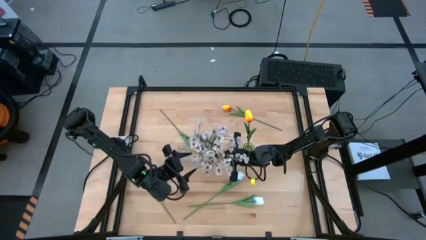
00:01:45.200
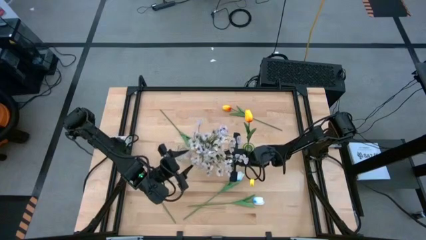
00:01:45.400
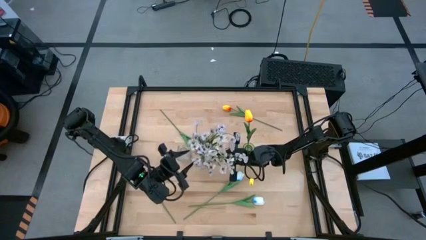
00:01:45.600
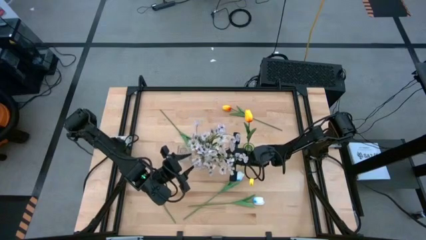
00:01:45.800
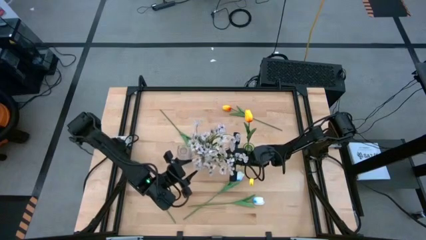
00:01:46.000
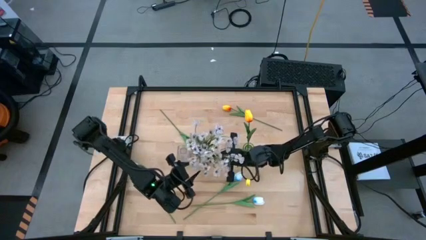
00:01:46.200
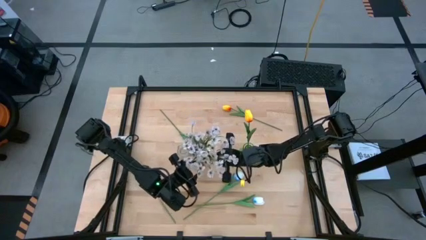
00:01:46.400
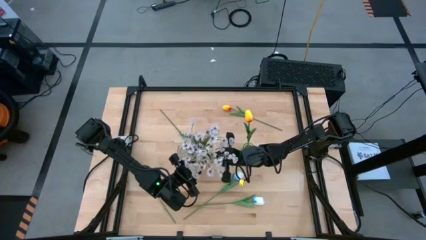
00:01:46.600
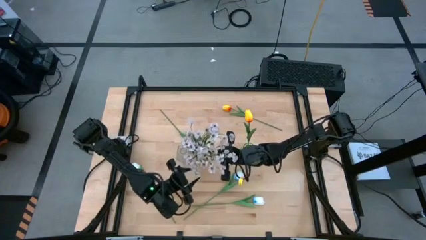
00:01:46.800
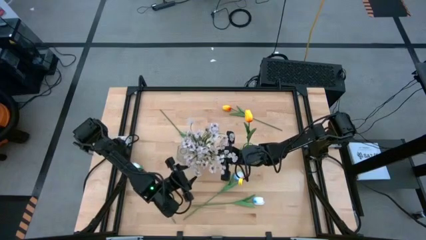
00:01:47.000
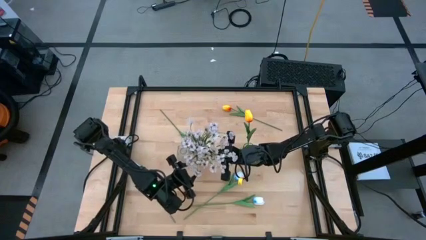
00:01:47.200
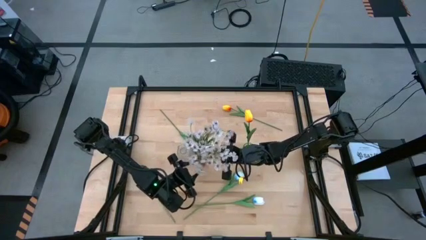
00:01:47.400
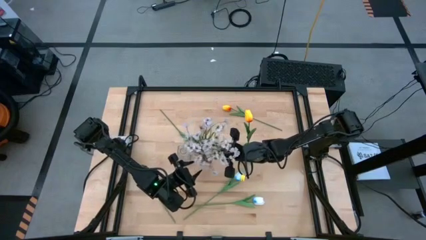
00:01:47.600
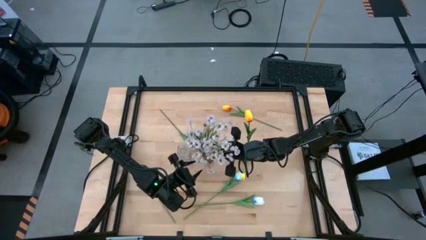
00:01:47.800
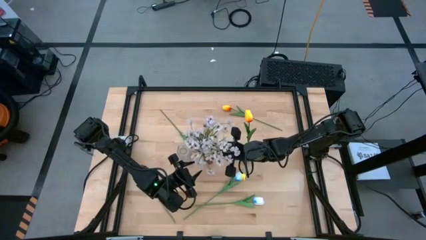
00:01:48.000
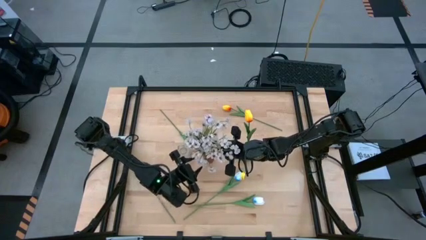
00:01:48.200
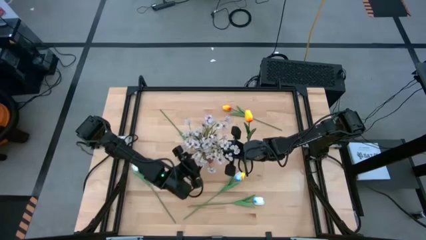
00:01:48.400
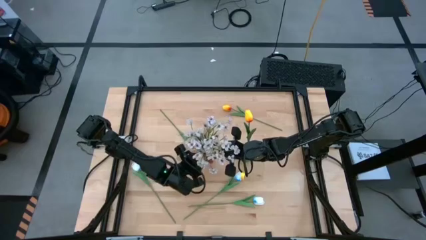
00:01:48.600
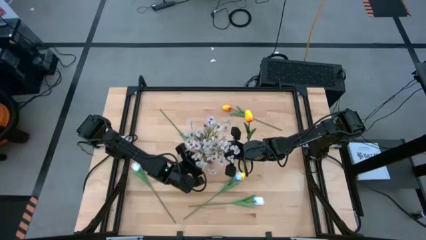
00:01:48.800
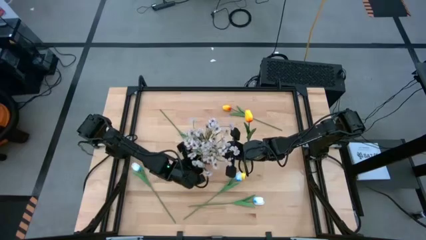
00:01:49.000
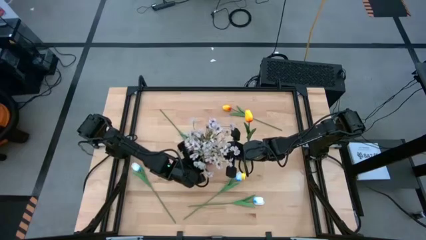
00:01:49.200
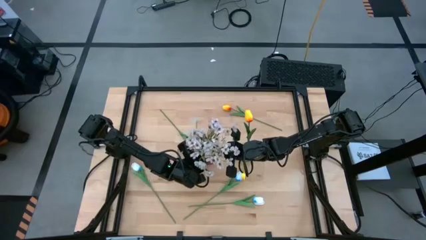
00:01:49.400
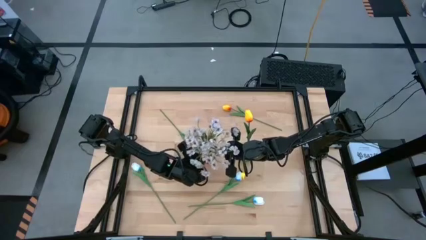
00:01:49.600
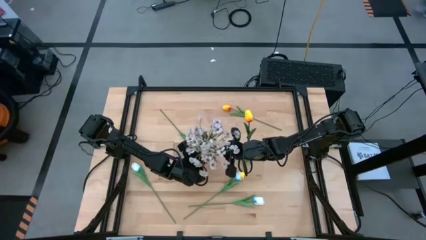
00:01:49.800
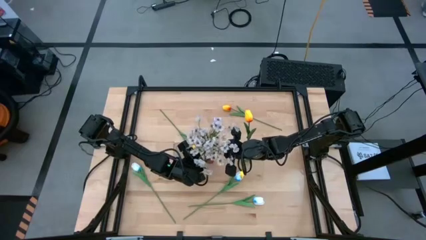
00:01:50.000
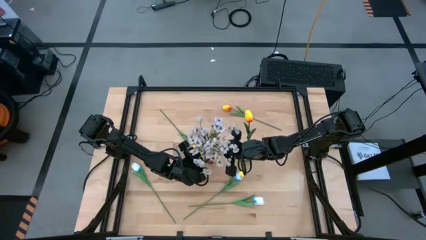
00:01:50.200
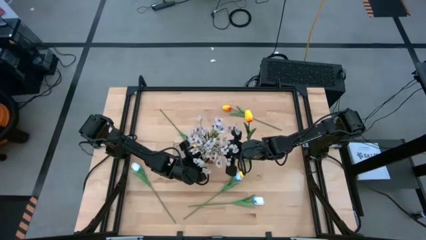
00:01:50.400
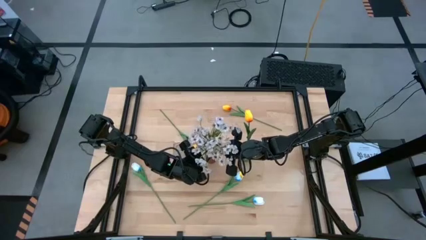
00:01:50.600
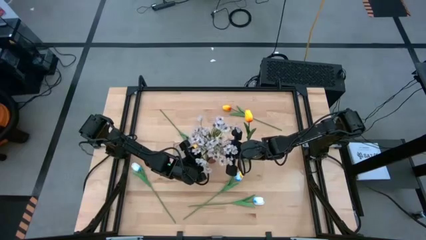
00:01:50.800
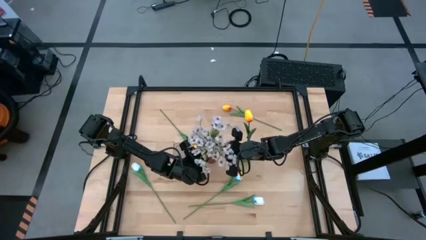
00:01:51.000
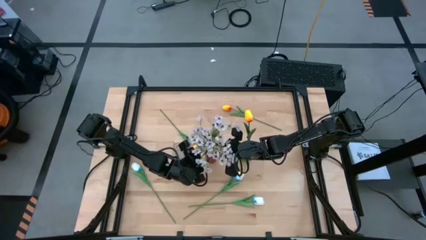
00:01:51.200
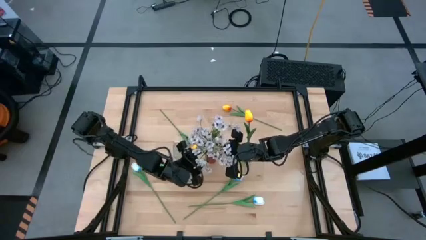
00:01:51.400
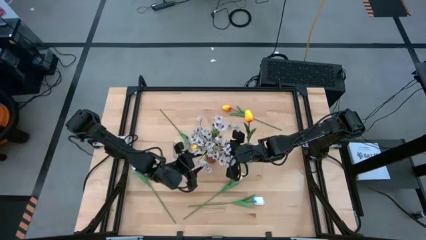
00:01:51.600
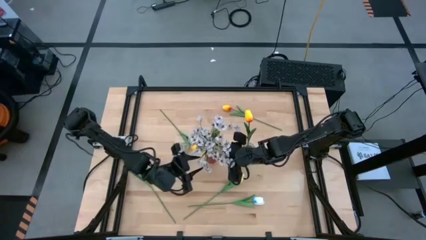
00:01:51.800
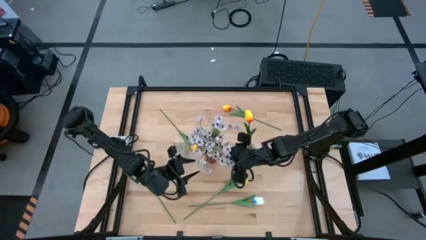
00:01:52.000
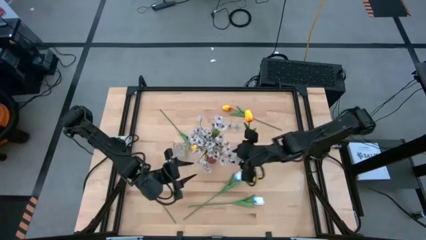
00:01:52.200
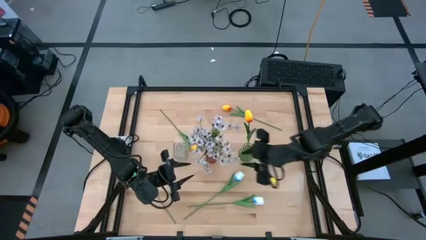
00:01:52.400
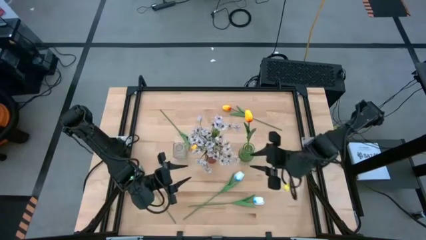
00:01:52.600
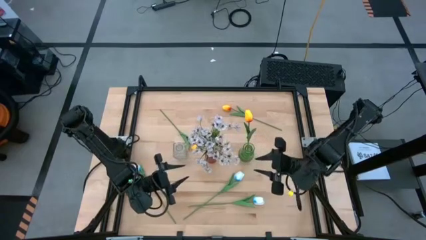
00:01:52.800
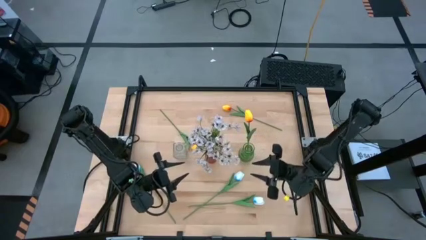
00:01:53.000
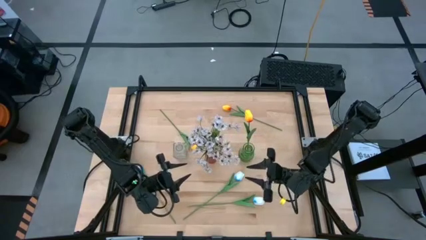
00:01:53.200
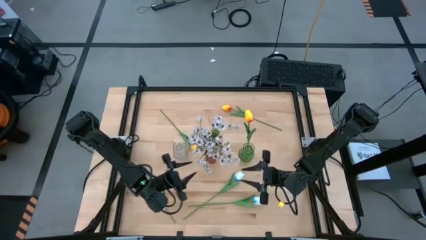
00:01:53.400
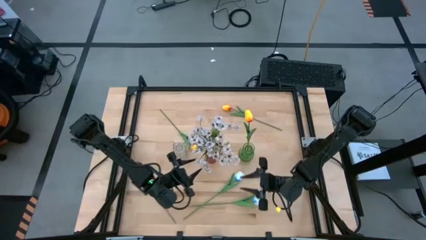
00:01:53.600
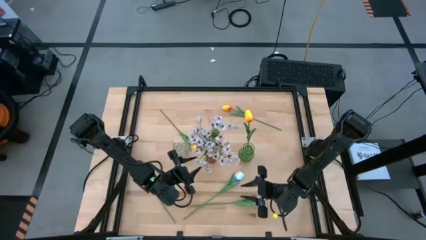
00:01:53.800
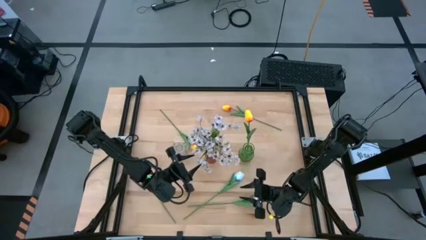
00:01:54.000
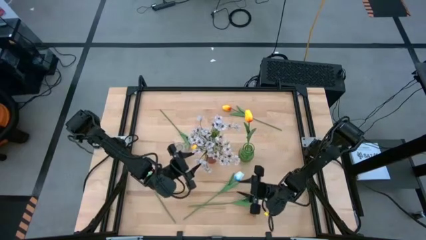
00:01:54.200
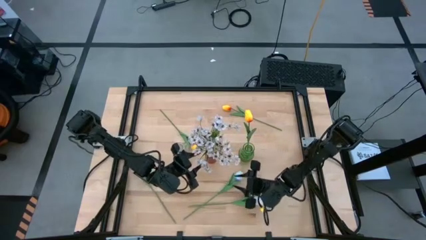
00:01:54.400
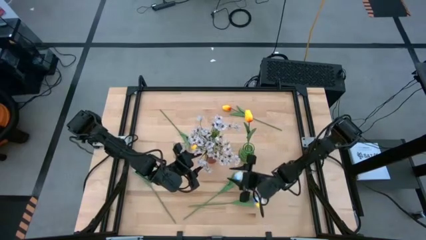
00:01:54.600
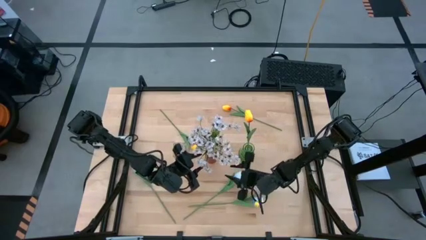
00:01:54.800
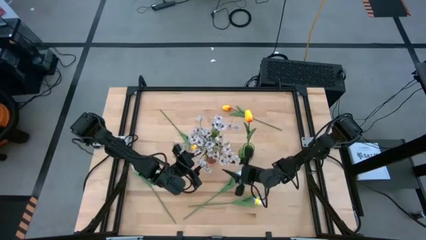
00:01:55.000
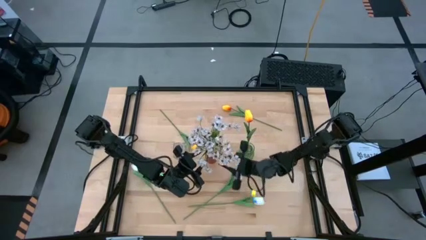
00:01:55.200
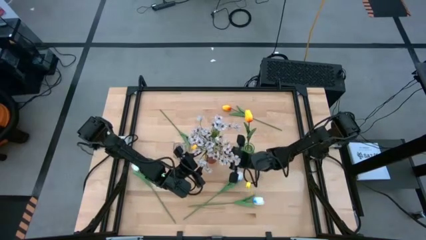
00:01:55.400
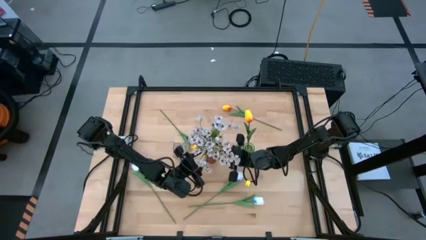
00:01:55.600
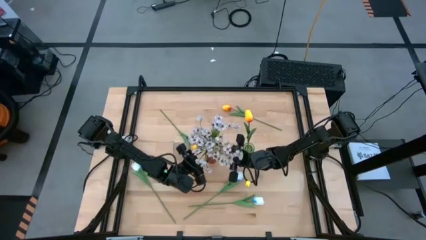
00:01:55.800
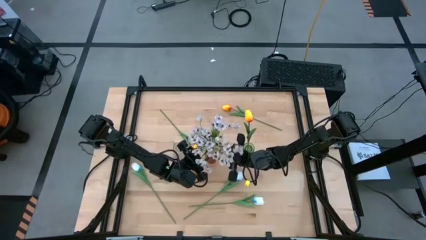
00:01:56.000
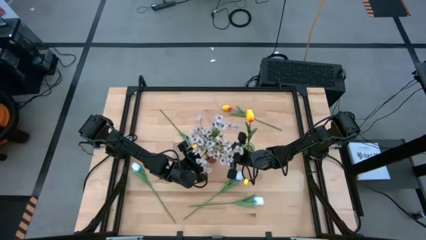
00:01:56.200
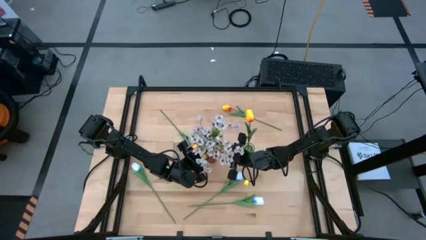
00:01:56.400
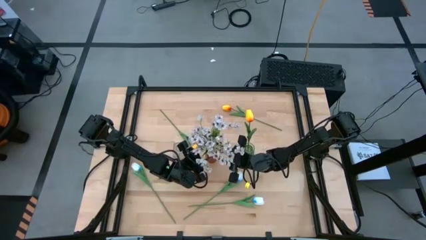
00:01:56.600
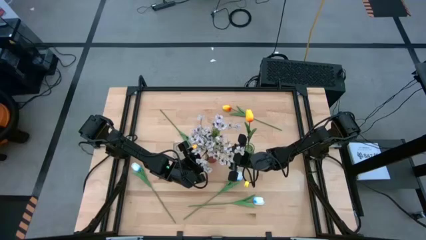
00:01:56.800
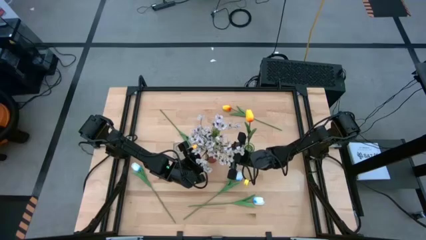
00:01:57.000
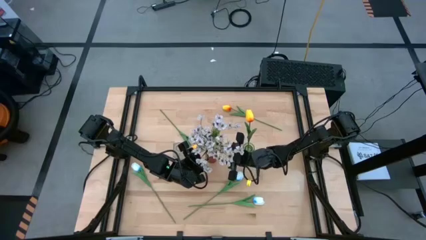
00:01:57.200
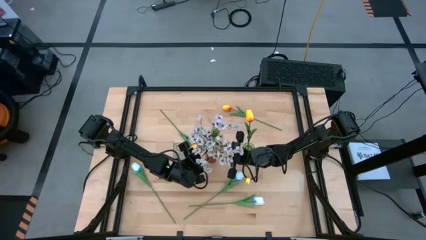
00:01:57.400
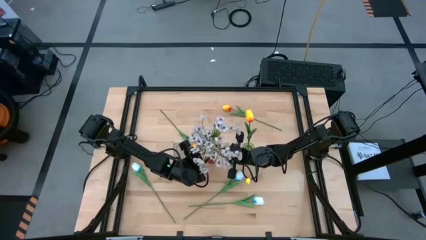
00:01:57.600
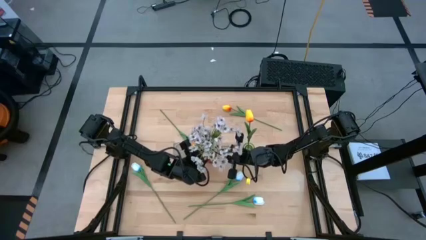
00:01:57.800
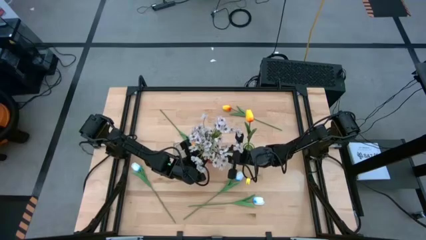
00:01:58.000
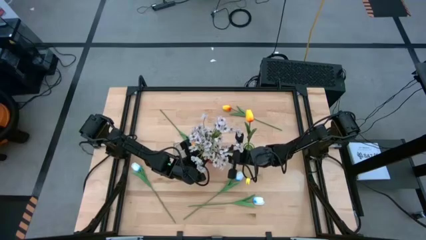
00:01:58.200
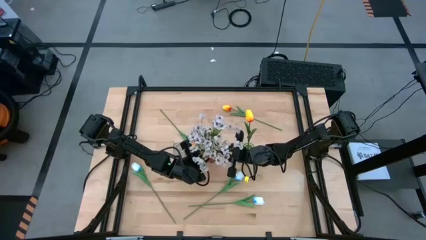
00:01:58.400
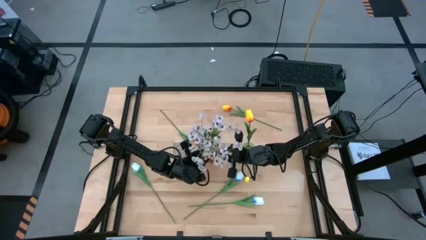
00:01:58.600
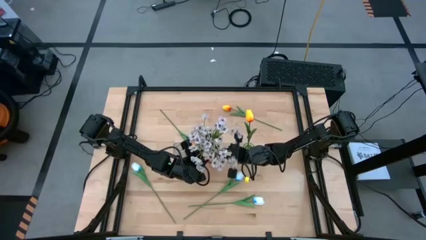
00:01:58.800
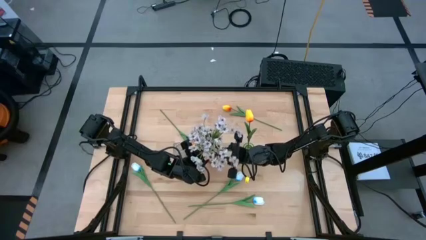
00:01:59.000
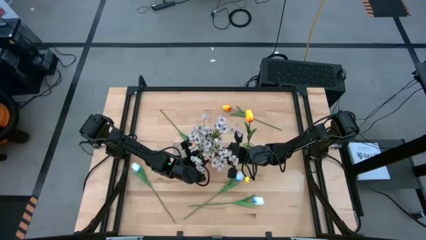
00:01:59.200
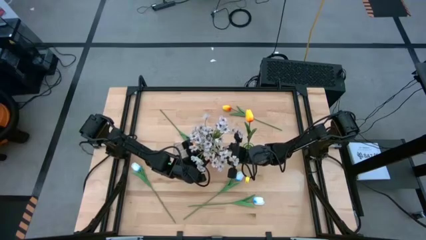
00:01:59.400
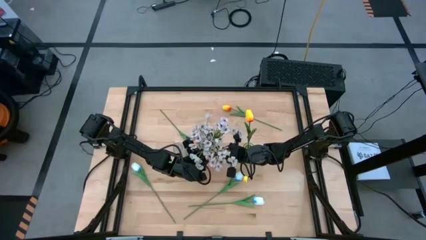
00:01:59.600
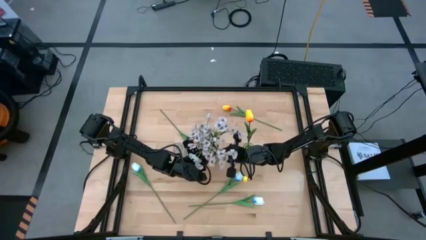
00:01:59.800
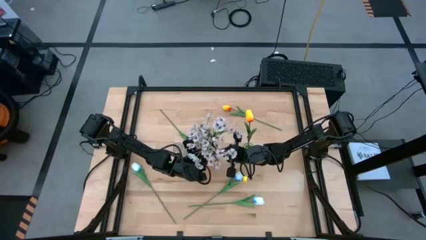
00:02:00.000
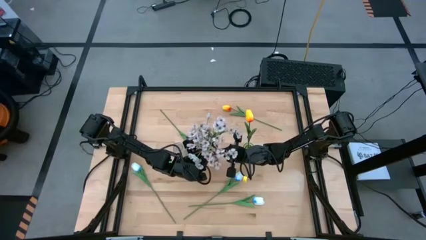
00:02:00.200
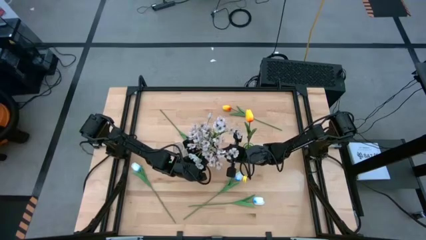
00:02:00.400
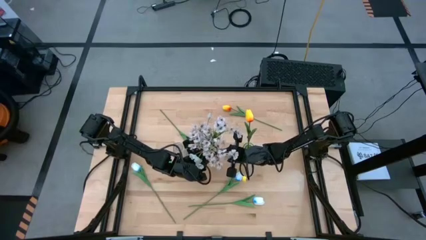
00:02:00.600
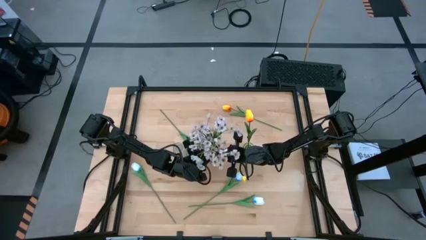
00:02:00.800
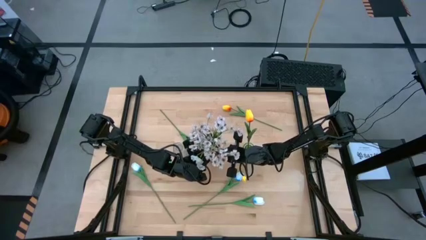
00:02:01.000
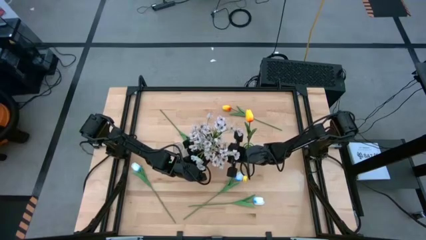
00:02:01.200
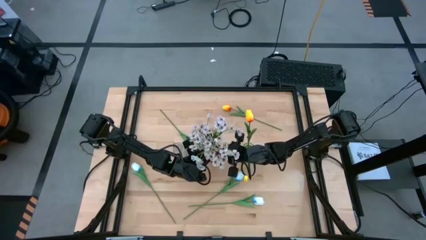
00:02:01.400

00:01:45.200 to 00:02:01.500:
Task: Sort flowers into vase by color
Put the white flowers into the red vase
